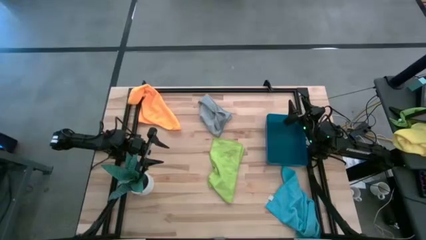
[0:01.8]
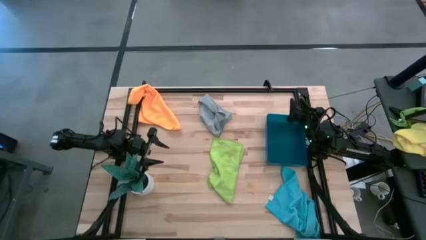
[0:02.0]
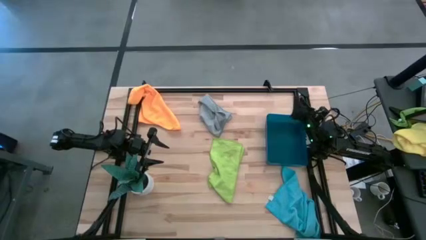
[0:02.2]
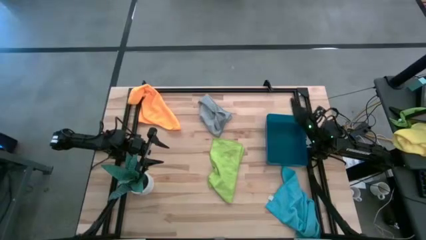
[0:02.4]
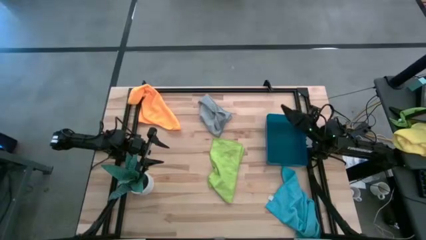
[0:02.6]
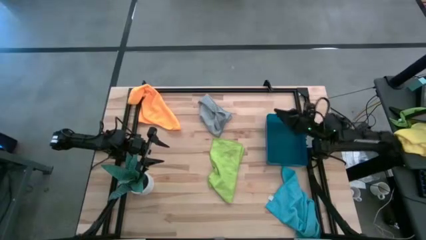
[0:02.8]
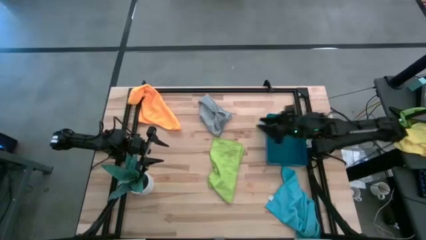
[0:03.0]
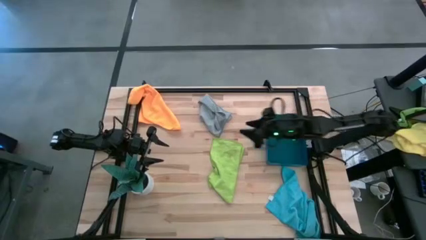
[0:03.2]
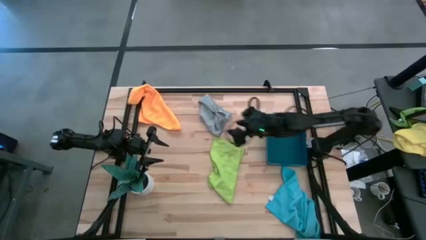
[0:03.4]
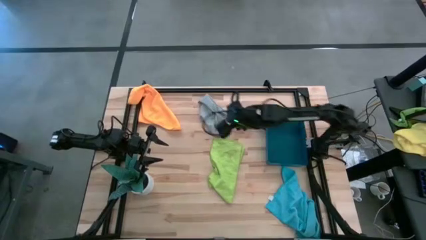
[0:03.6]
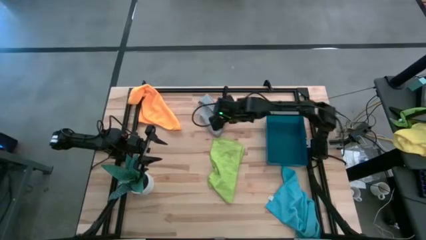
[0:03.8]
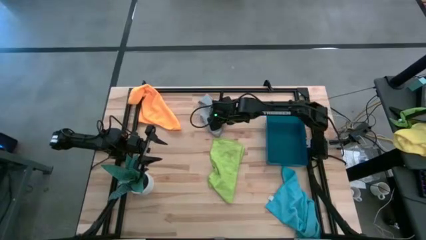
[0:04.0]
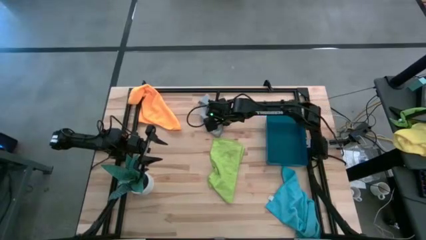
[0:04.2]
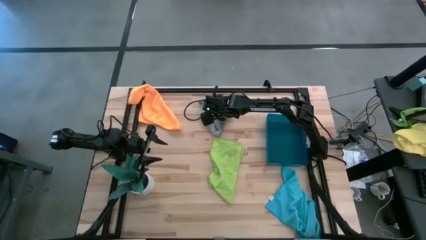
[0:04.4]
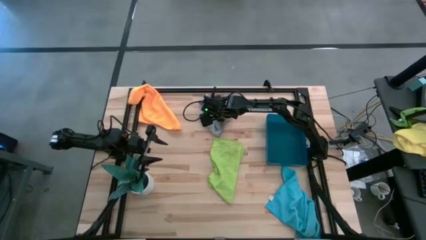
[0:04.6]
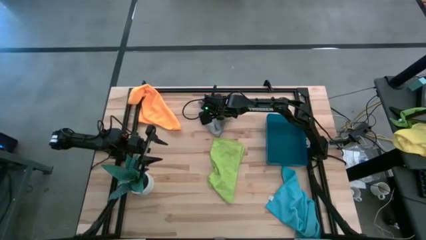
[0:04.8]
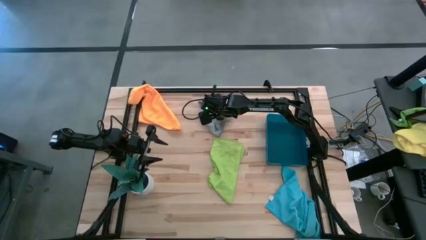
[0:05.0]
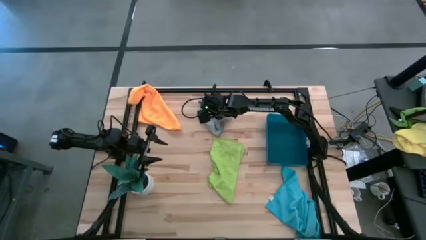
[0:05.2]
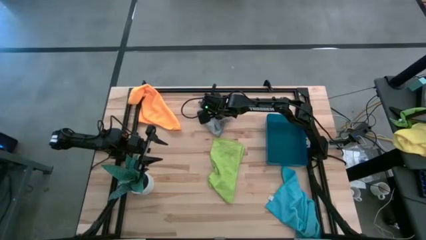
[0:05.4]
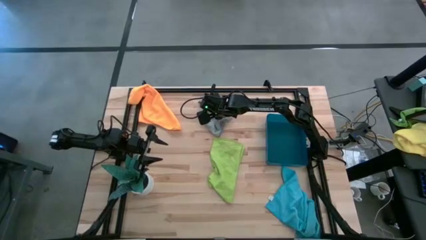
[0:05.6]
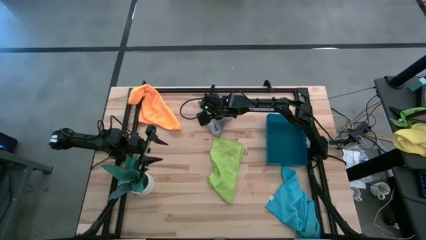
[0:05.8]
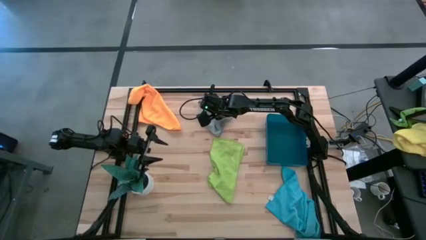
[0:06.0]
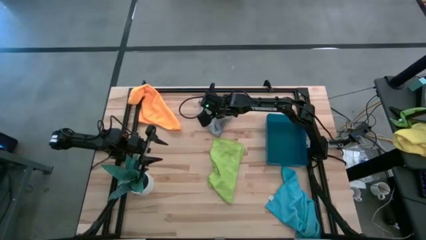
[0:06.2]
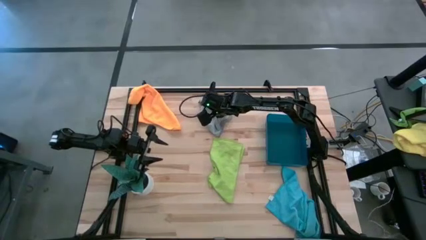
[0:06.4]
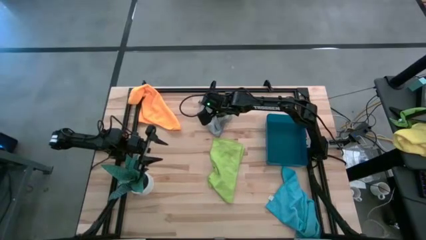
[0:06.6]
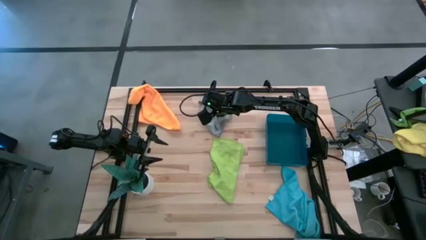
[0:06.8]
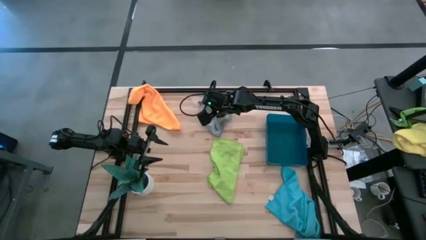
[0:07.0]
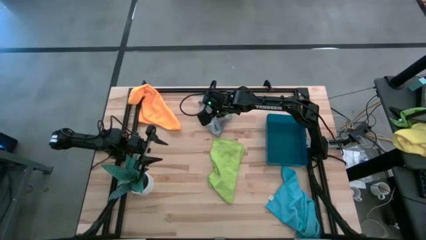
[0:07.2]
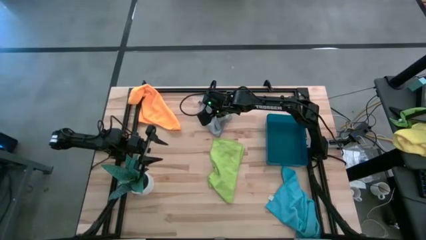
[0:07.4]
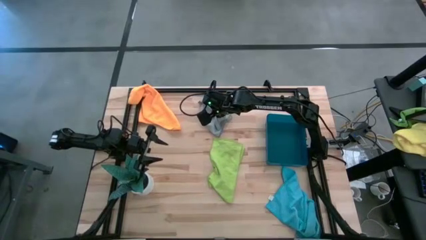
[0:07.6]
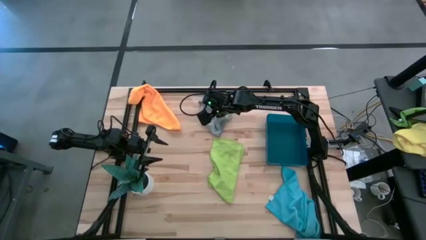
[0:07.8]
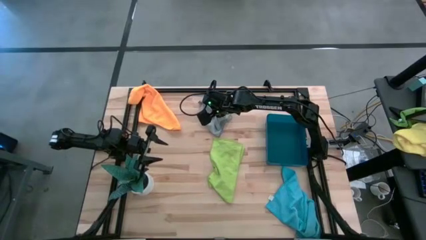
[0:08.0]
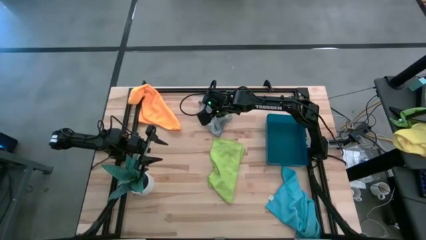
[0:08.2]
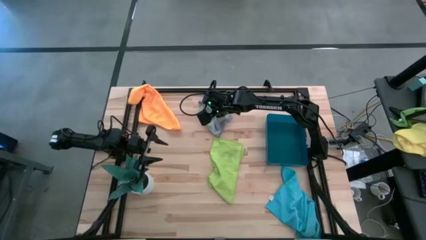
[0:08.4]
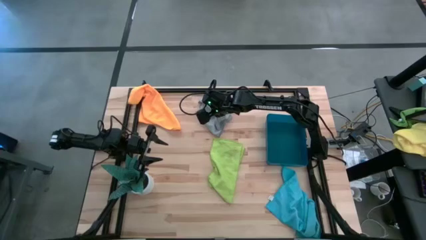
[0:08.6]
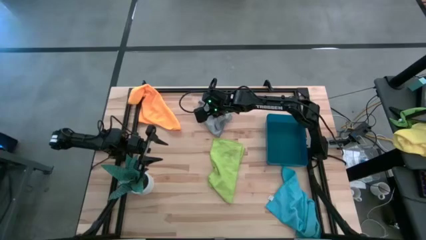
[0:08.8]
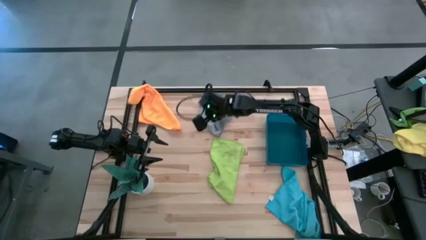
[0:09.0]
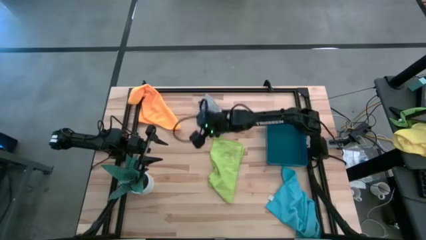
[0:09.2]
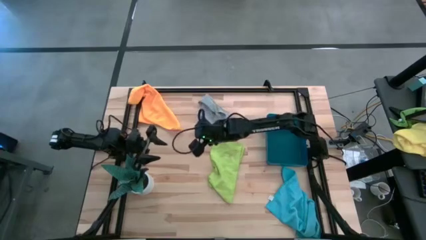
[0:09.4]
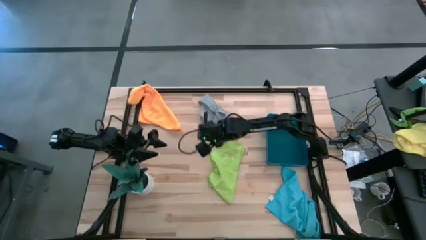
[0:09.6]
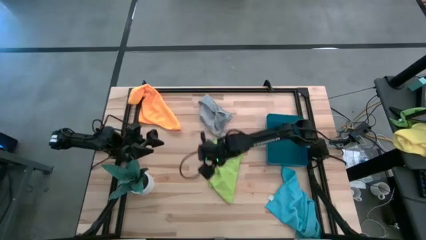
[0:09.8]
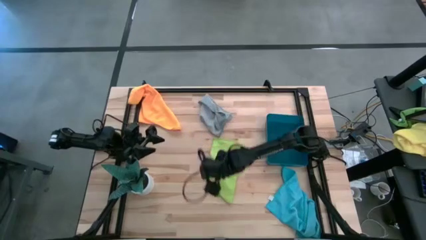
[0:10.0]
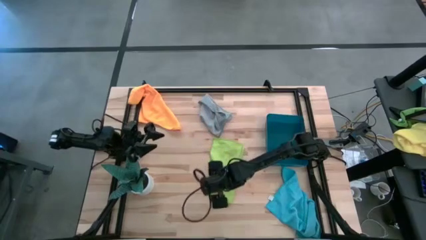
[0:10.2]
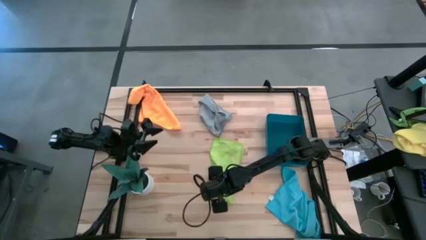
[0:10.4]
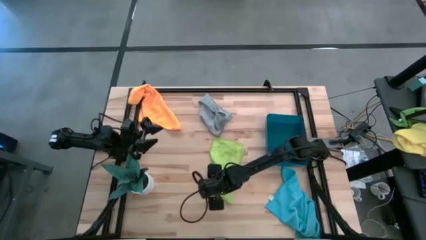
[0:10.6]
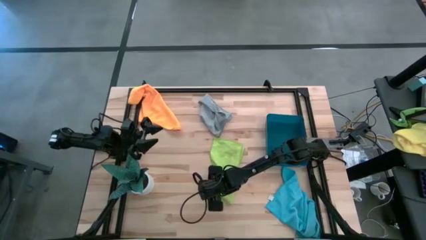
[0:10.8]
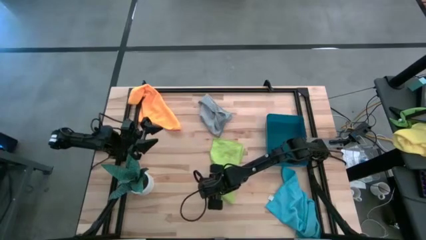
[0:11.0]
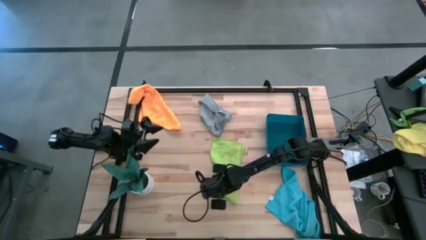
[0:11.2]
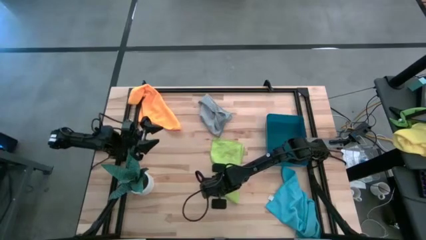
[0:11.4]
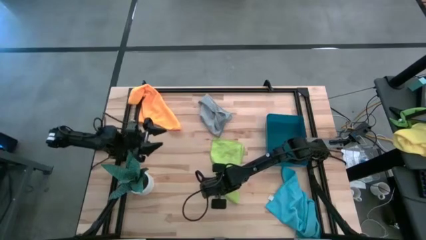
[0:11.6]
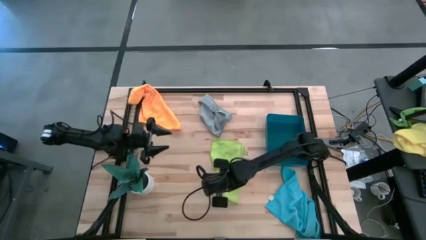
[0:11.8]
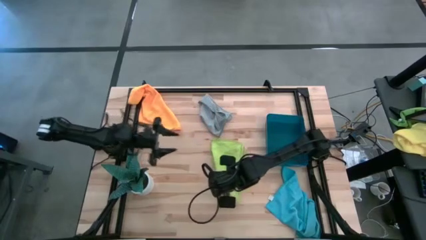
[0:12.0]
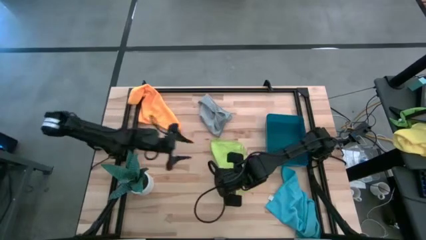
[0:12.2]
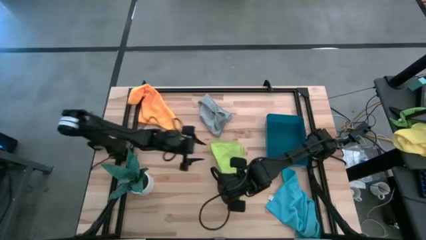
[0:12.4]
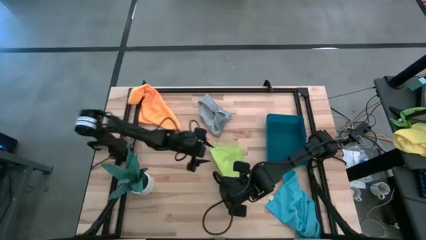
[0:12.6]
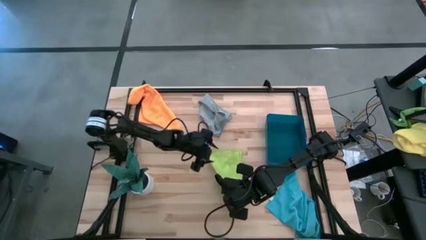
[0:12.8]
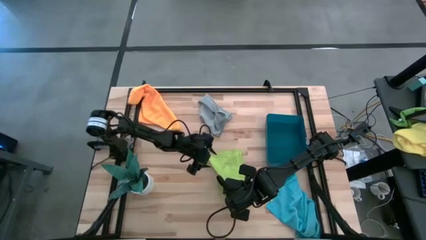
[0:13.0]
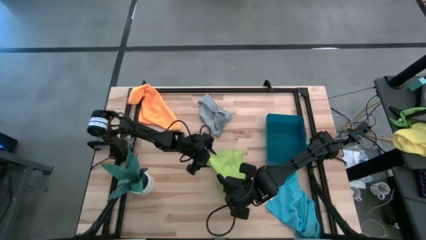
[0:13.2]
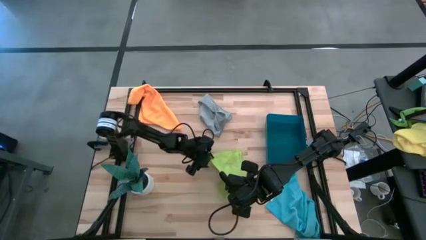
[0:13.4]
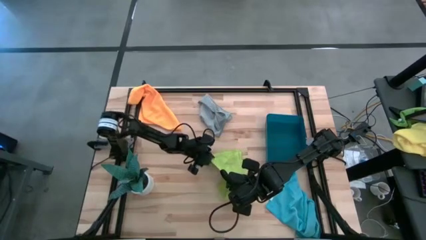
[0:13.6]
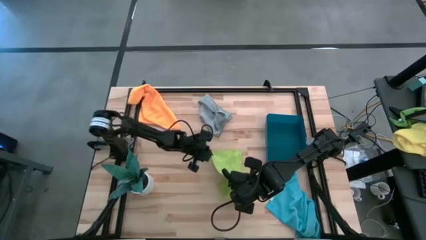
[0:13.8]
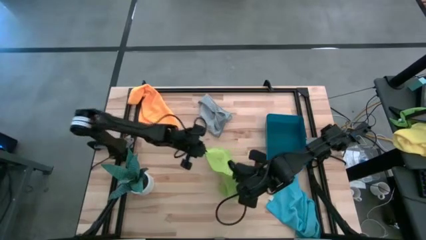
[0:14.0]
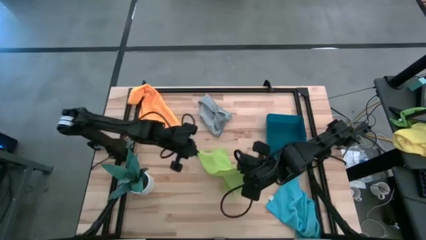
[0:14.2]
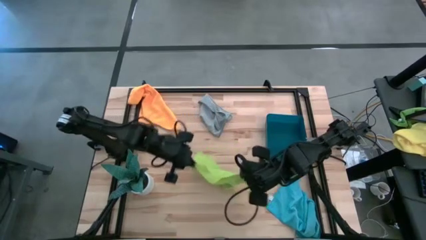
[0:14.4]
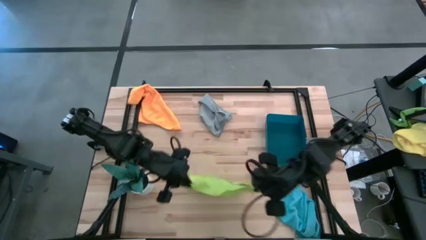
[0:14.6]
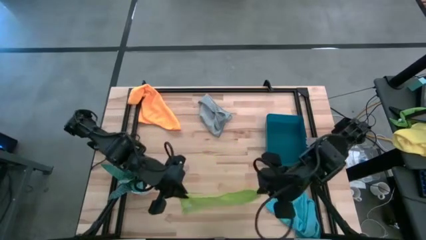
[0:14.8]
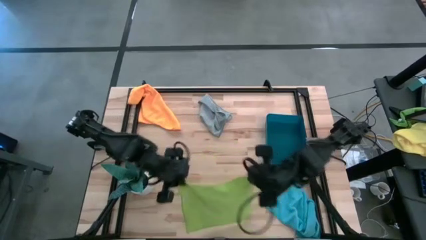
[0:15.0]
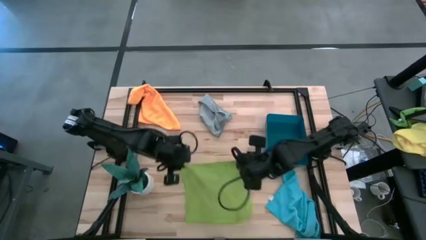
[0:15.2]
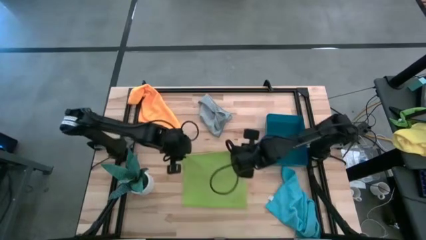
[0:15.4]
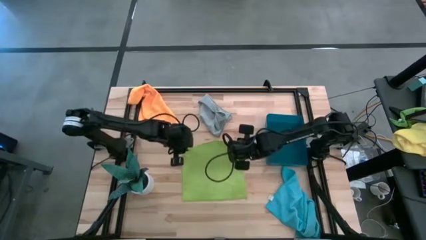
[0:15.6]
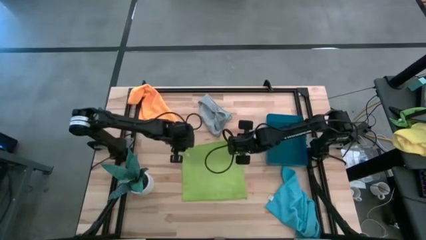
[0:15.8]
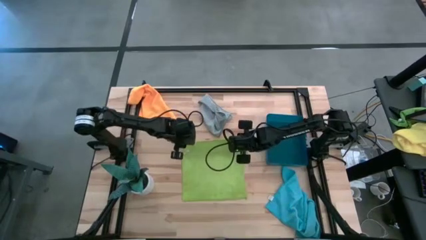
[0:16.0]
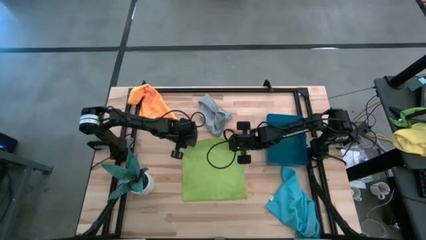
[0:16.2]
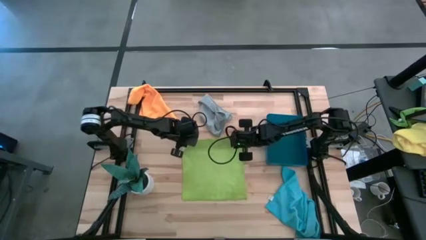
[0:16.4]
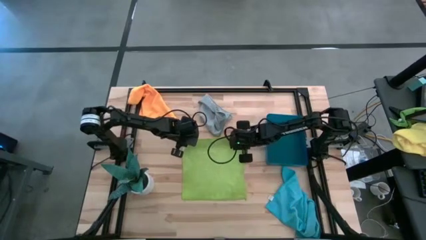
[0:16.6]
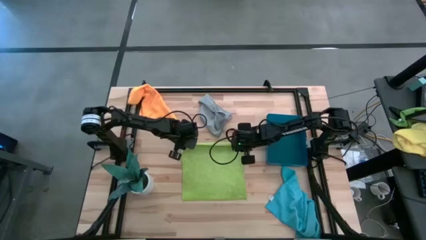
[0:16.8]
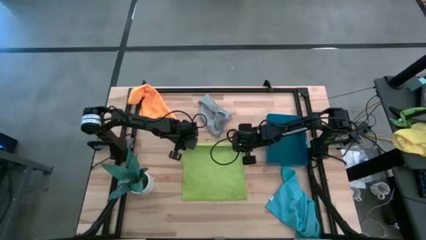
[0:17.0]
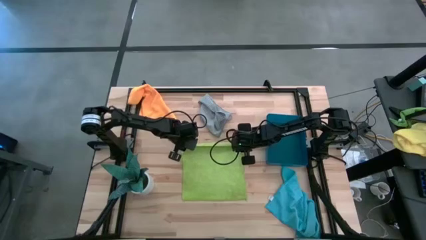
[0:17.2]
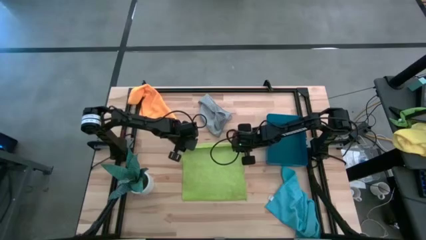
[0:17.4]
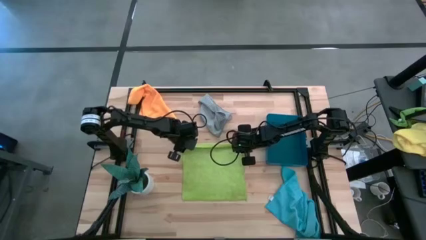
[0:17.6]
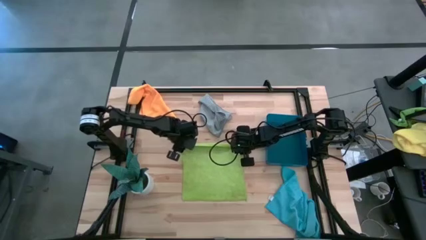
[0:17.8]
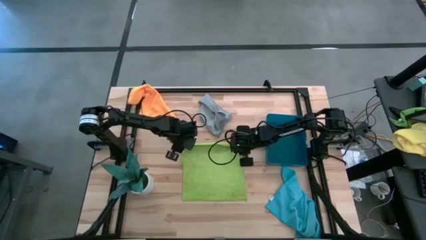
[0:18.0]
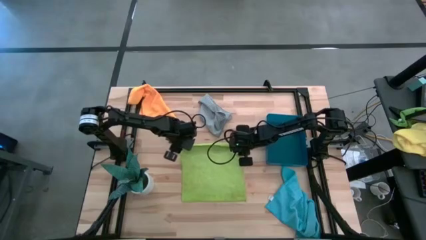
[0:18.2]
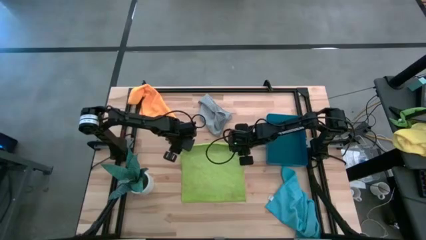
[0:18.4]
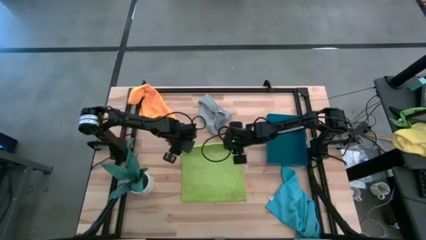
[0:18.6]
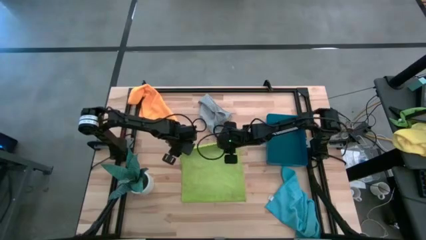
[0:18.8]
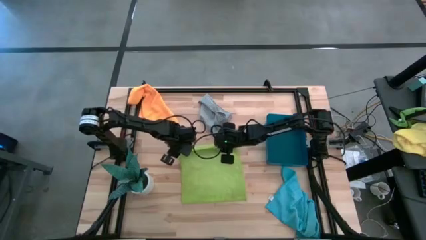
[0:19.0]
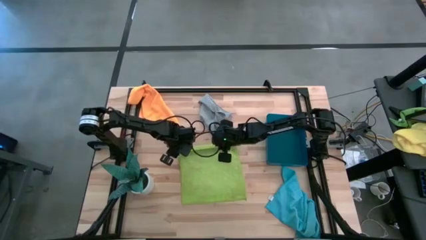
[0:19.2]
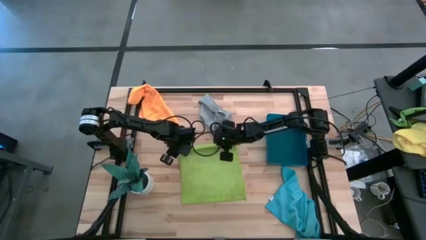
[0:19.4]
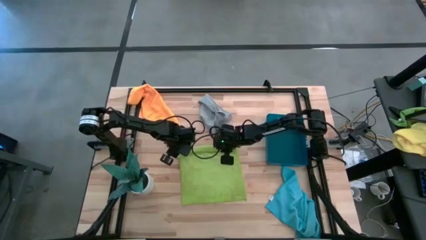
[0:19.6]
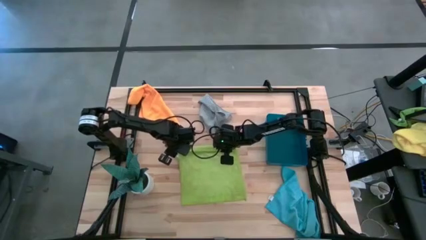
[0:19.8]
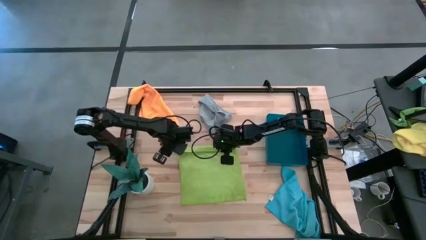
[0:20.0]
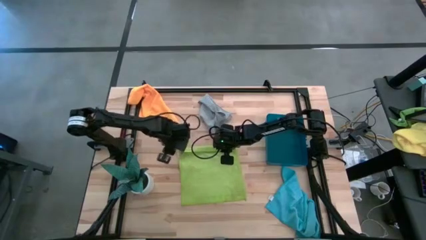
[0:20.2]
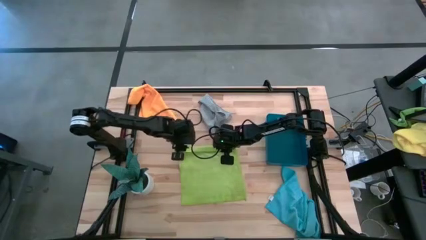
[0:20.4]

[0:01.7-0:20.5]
Task: Roll microfiber towels into tight, uniform cylinder then place into a basket
Roll the green towel
